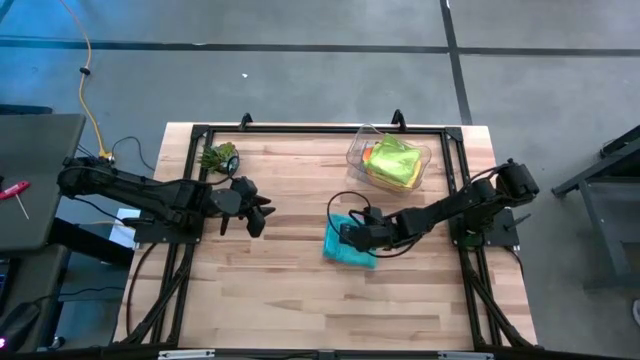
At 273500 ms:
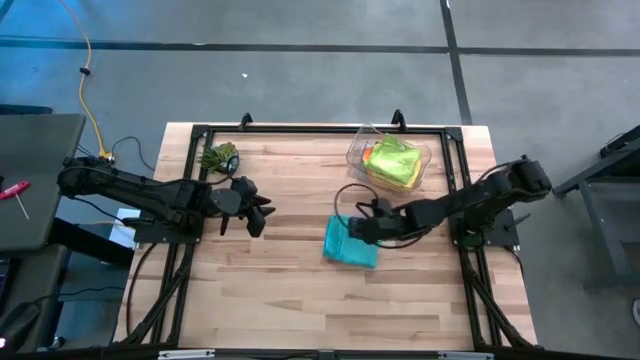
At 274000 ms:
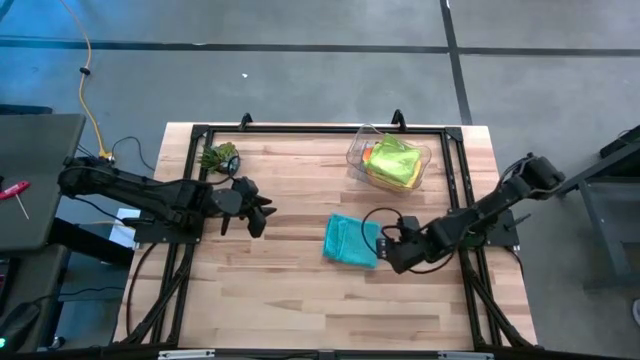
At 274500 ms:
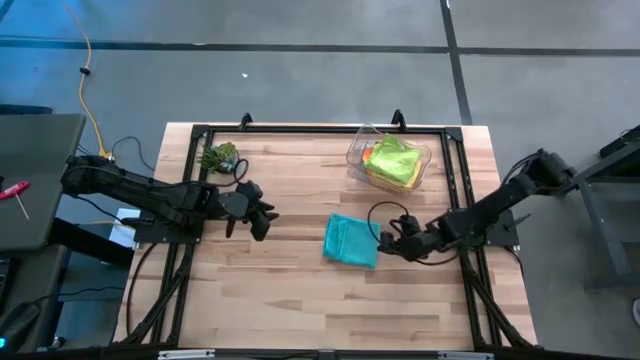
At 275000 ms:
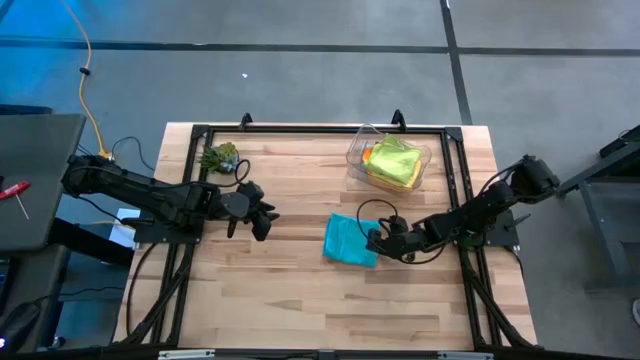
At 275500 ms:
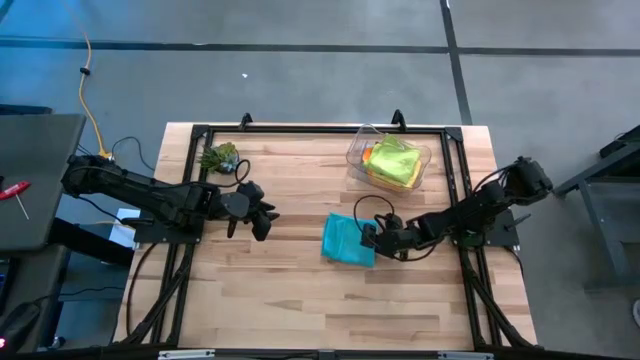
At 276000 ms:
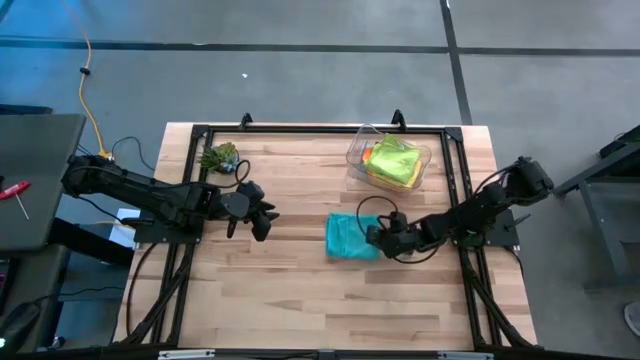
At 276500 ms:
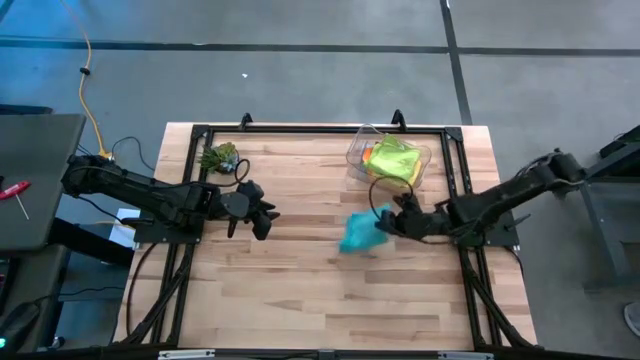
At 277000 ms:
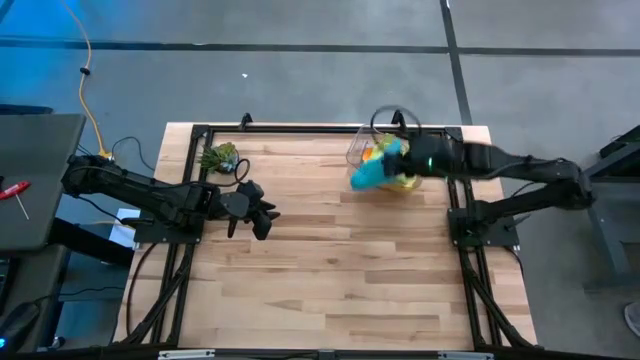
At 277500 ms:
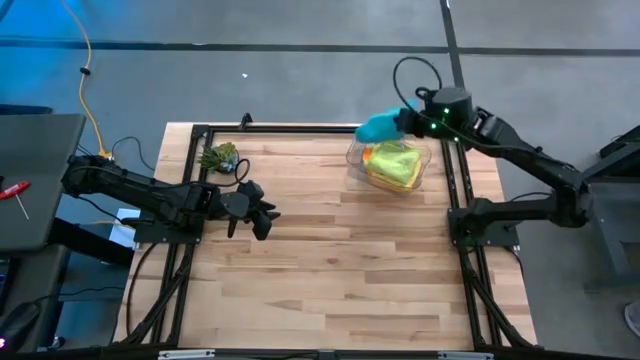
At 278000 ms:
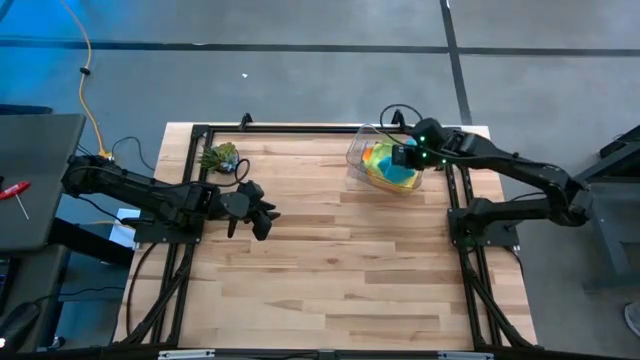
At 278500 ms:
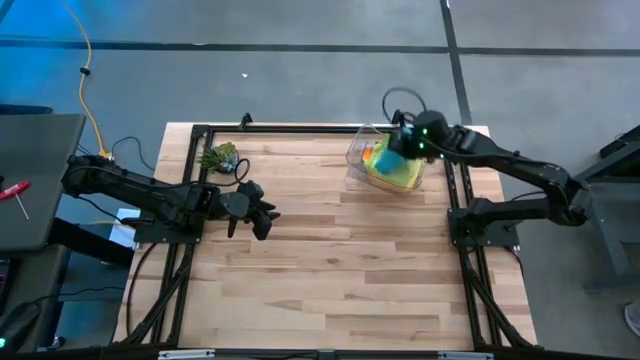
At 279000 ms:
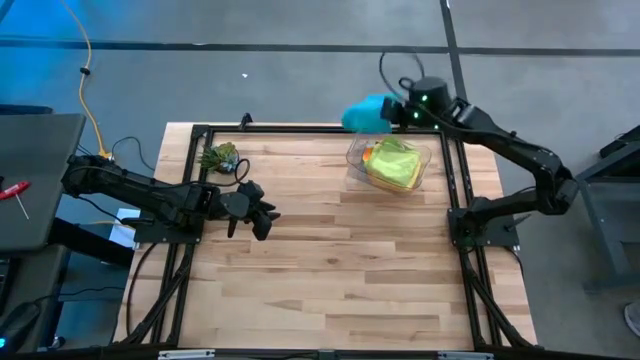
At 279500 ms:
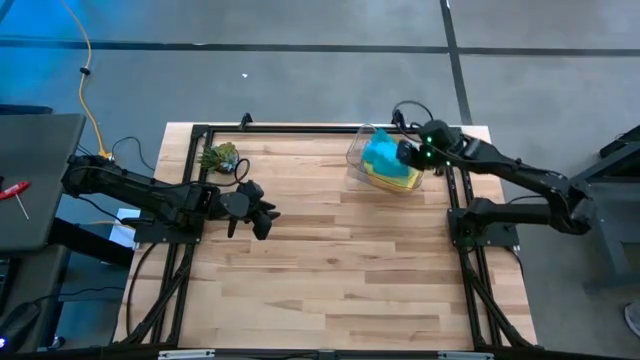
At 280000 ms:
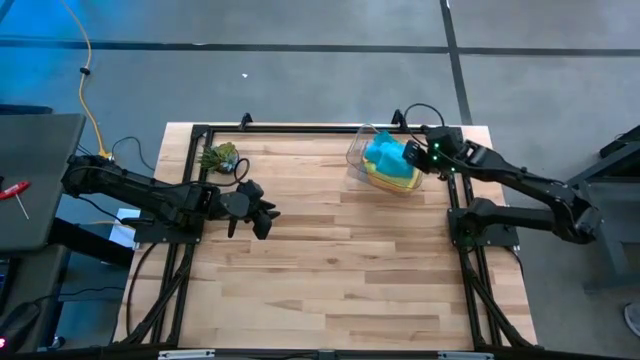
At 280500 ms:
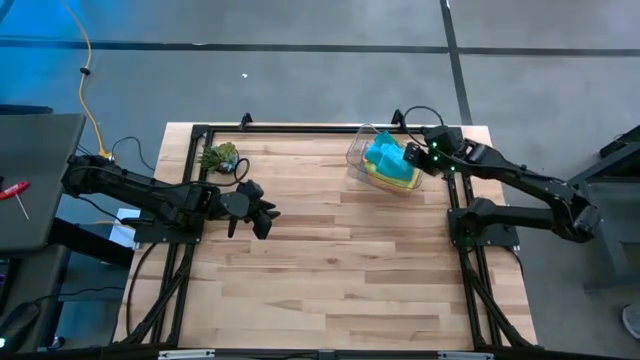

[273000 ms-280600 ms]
Task: Fold microfiber towels
Put the blue microfiber towel into the transparent bin

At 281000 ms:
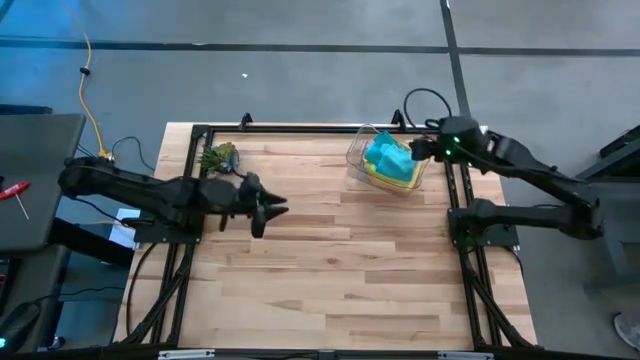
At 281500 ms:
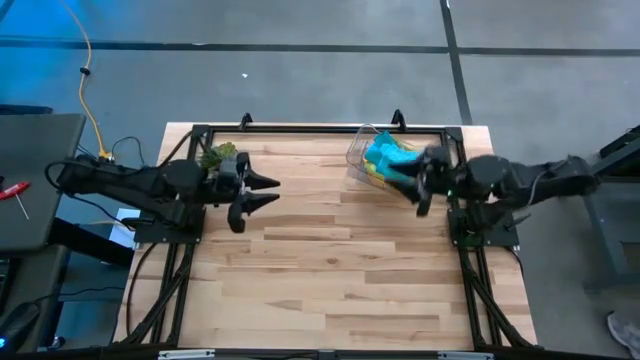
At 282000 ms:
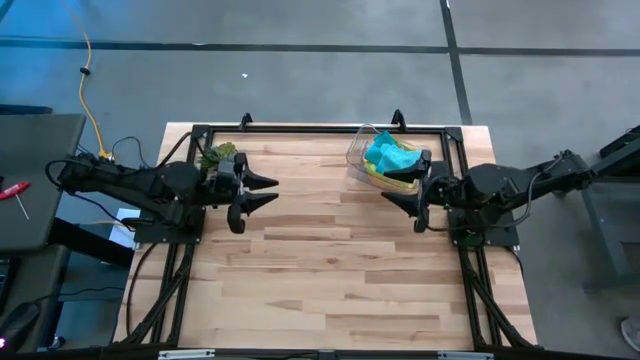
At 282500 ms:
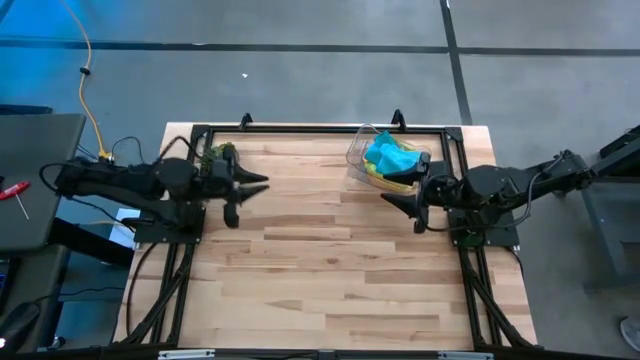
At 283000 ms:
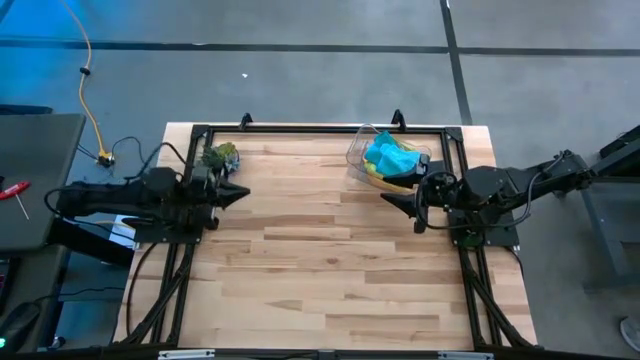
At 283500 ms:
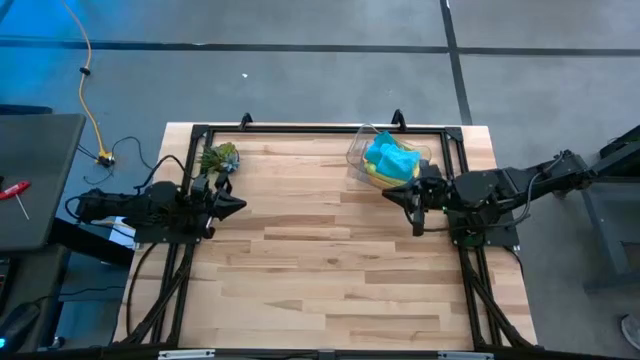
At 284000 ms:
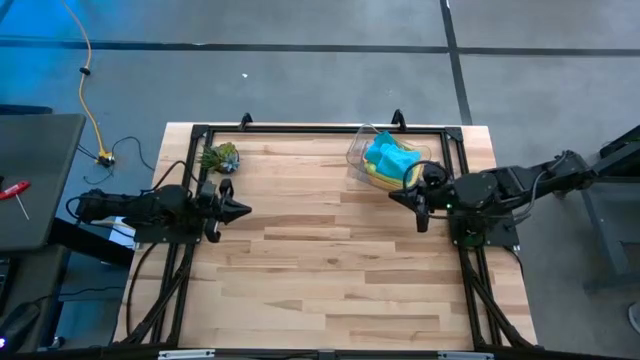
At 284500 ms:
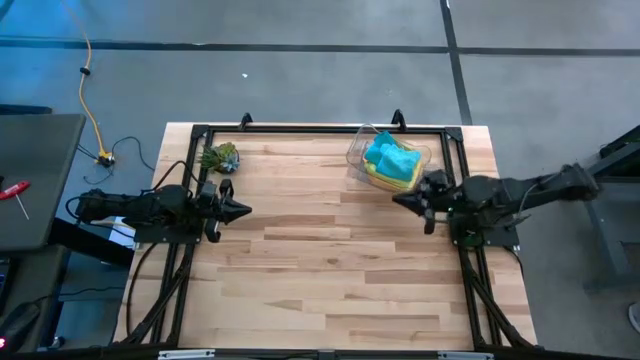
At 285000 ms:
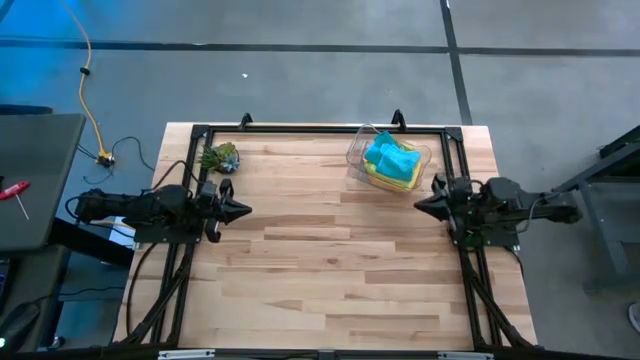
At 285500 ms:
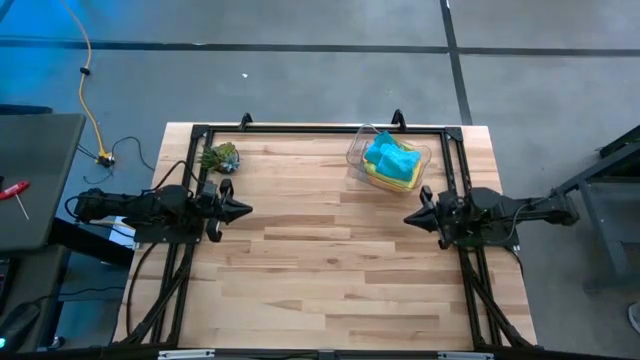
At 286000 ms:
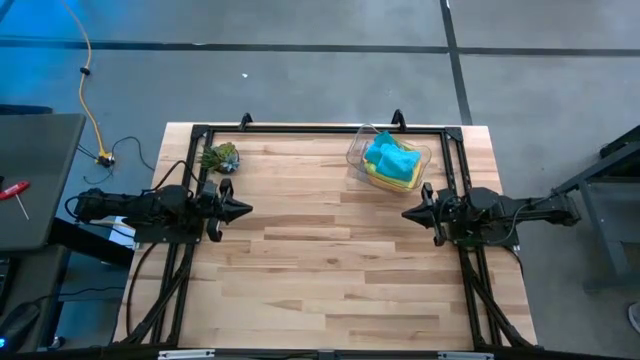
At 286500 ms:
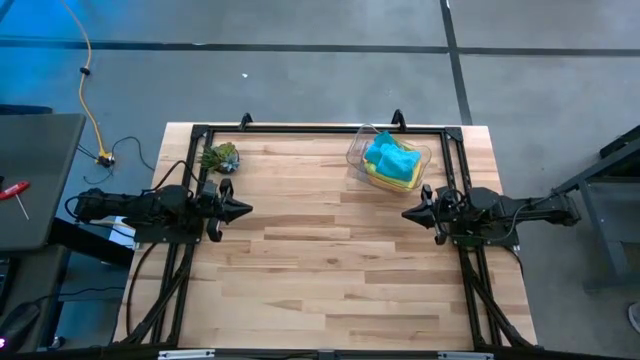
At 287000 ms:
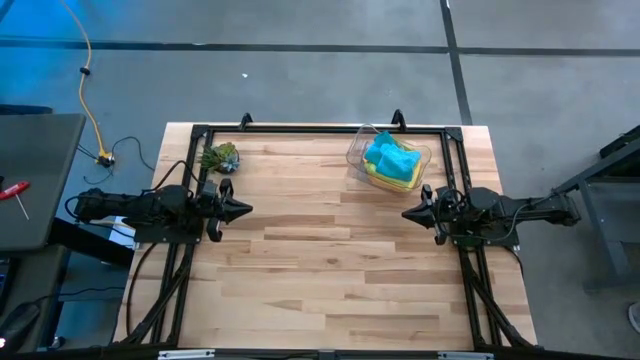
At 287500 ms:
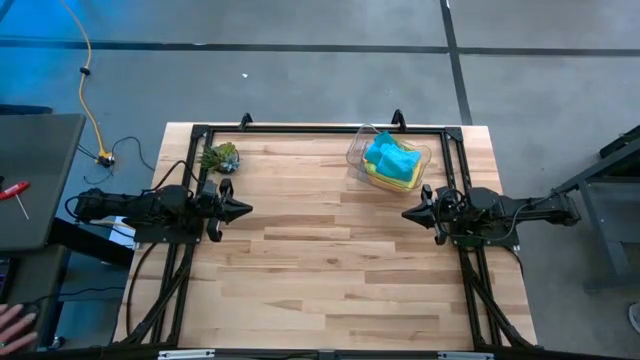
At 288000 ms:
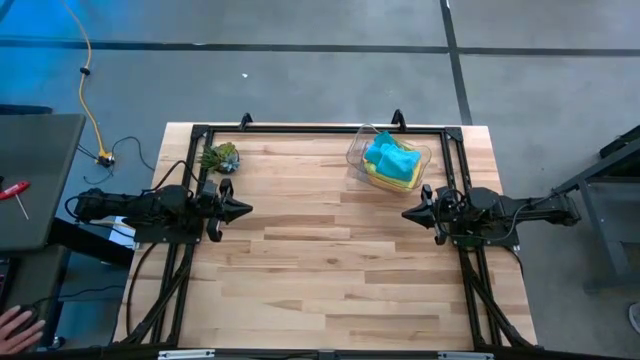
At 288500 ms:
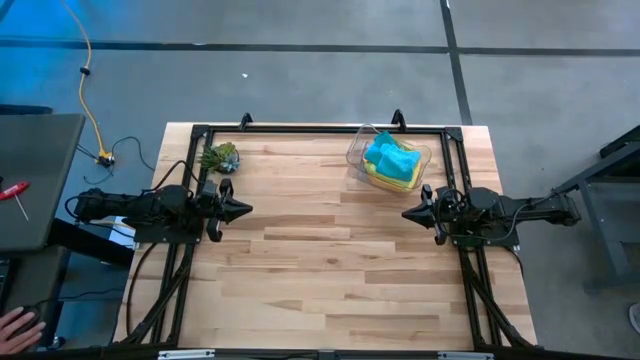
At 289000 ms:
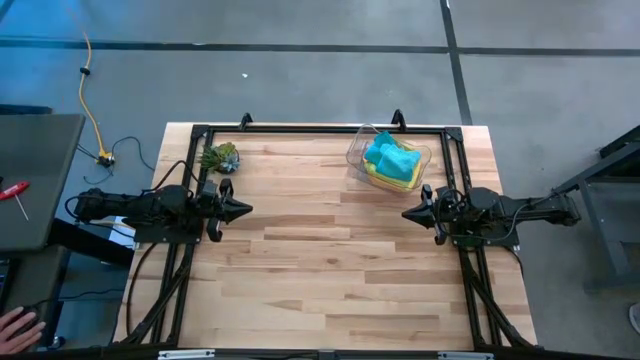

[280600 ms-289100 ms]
Return to Home Position

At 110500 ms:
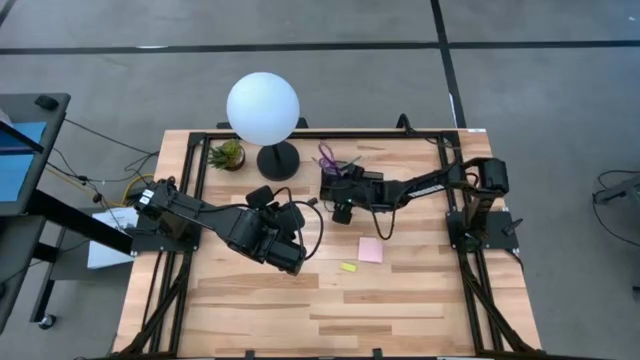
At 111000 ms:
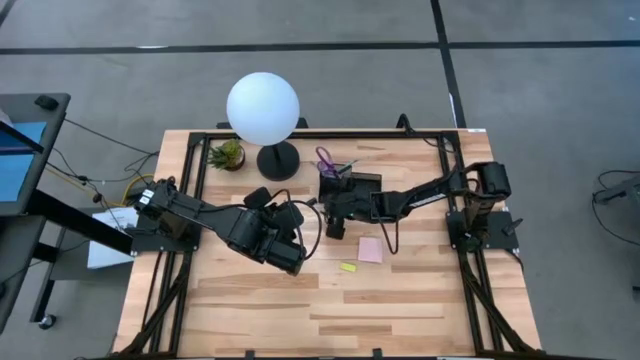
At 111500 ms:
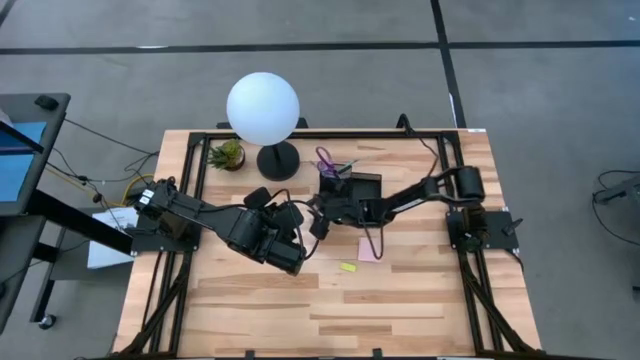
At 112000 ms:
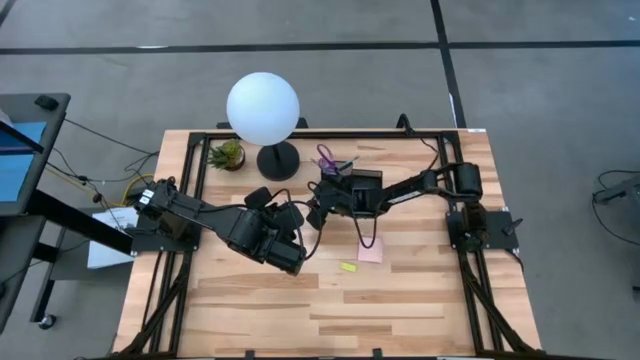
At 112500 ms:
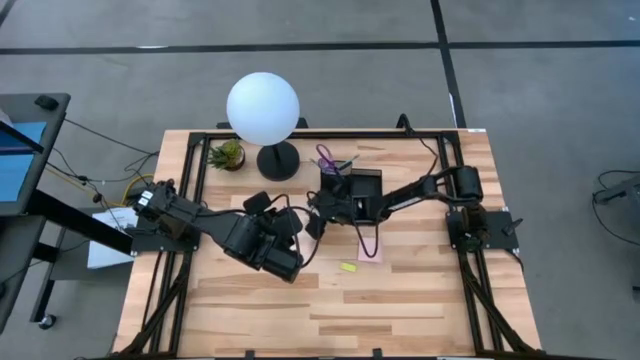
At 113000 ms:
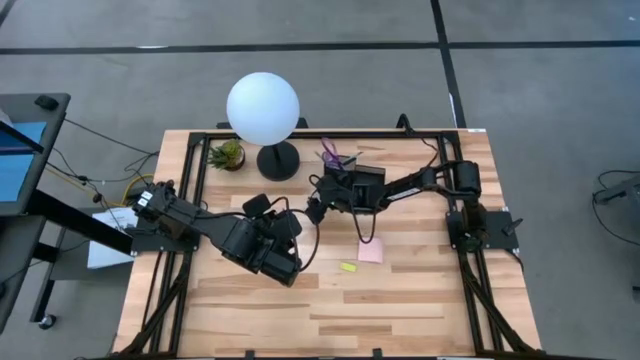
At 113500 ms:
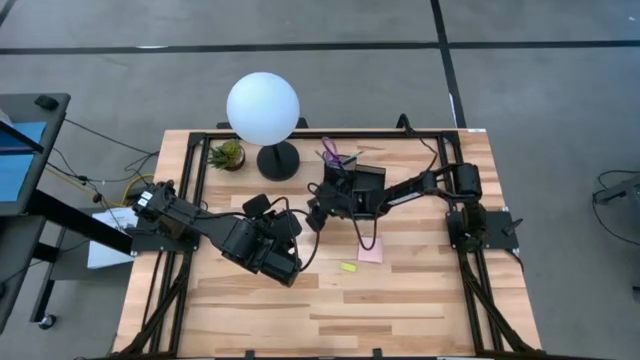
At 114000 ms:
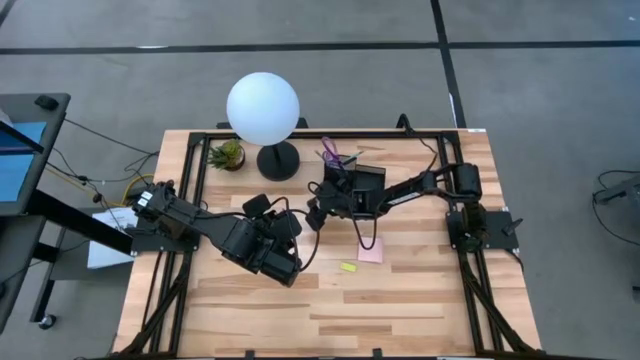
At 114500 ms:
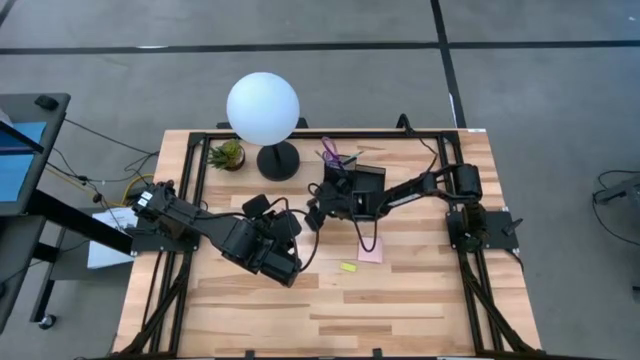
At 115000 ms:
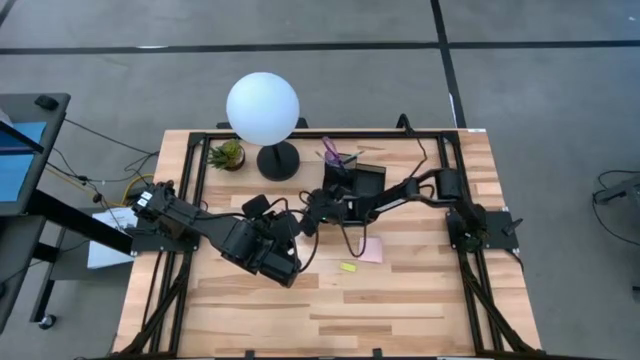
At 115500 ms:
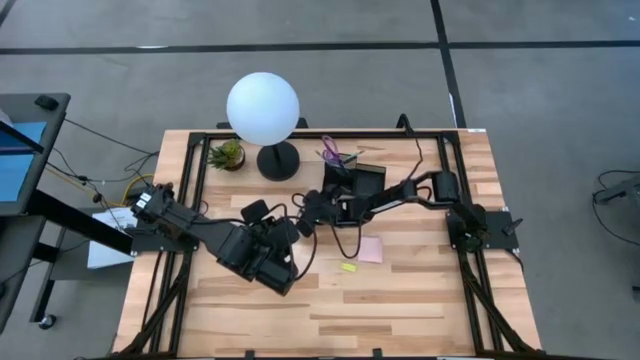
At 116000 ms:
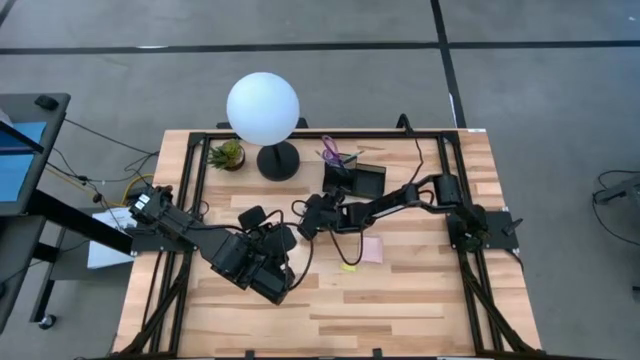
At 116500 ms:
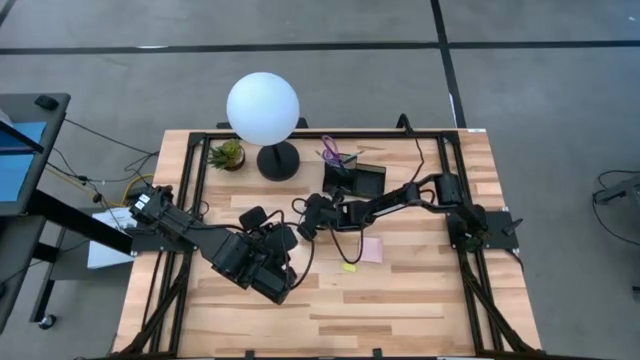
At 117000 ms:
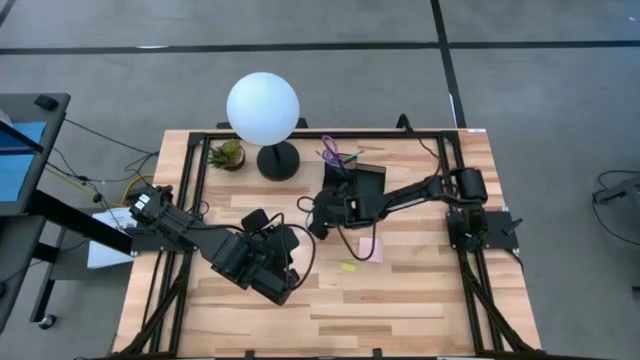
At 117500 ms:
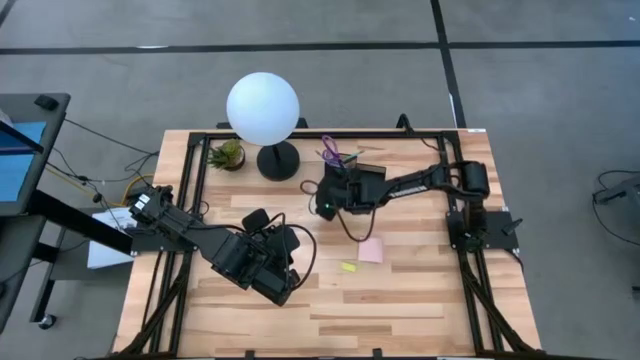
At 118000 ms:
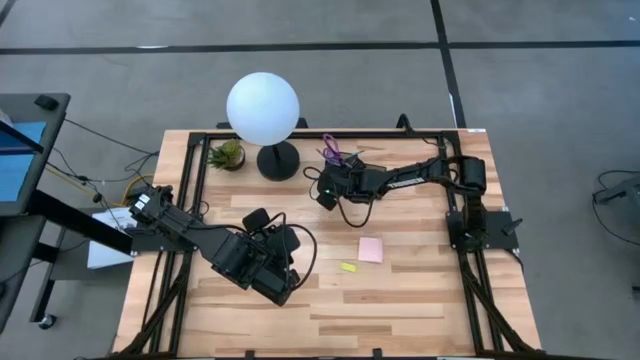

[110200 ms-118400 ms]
Task: Pick and place office supplies into organizer
Put the black binder clip into the black desk organizer
